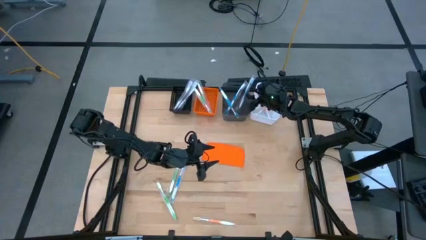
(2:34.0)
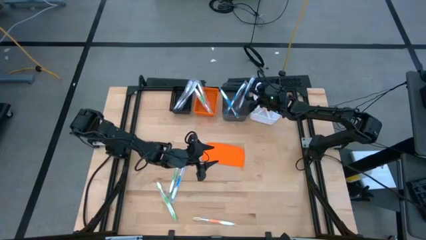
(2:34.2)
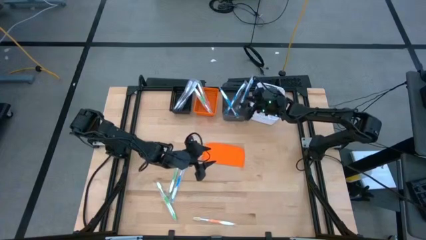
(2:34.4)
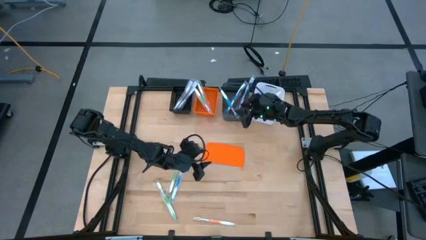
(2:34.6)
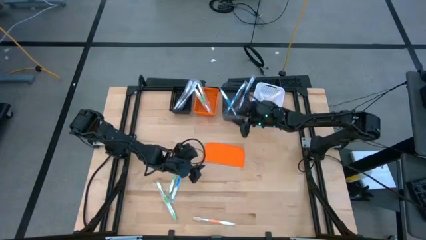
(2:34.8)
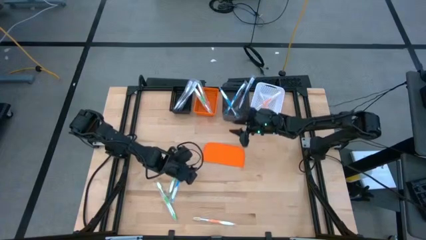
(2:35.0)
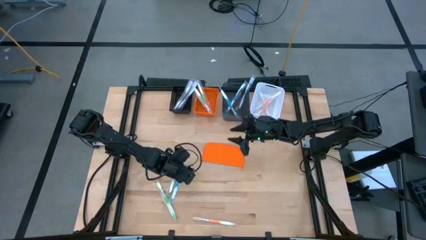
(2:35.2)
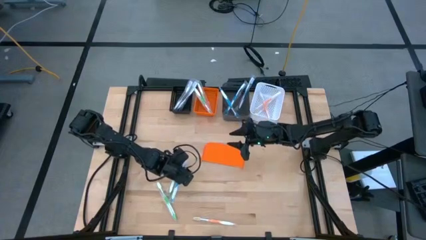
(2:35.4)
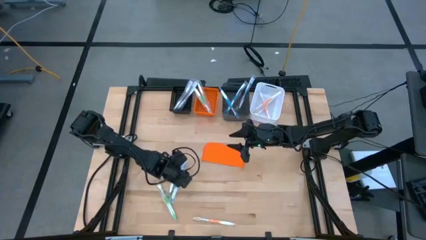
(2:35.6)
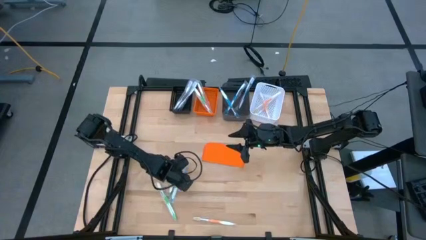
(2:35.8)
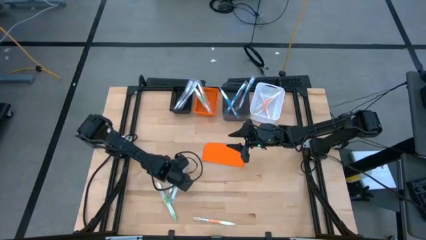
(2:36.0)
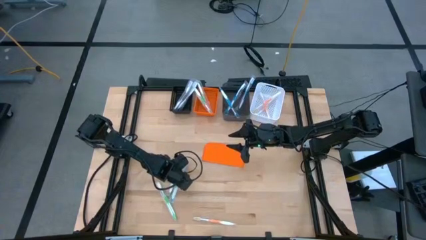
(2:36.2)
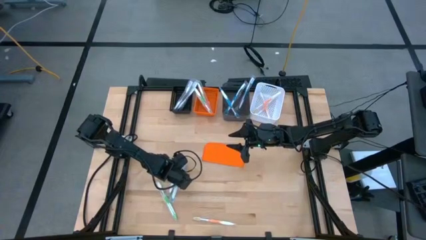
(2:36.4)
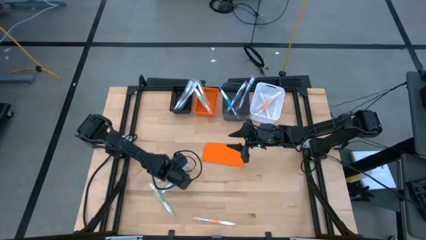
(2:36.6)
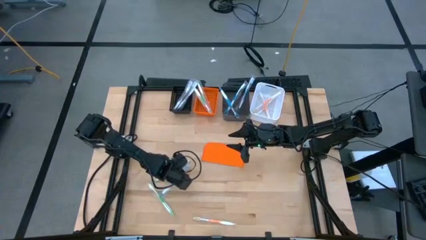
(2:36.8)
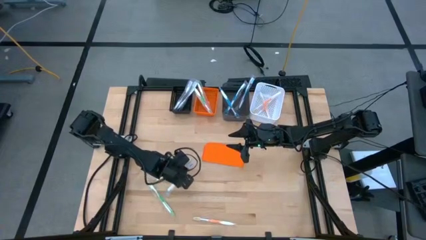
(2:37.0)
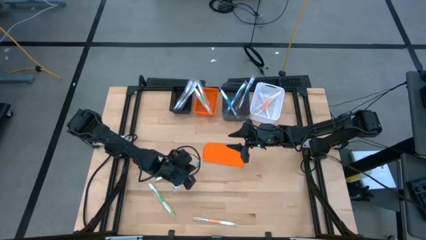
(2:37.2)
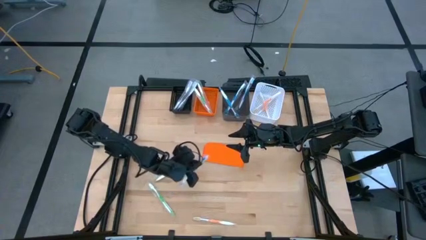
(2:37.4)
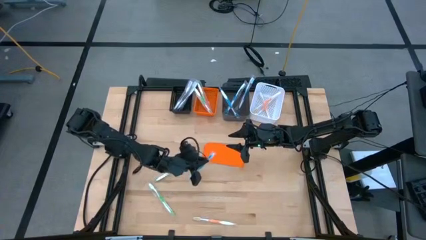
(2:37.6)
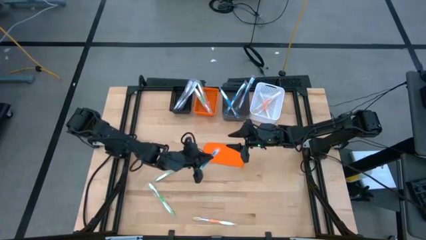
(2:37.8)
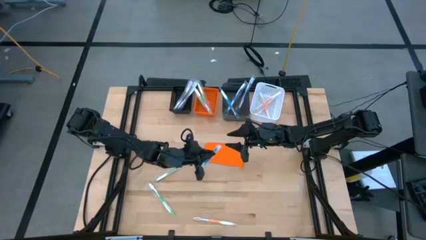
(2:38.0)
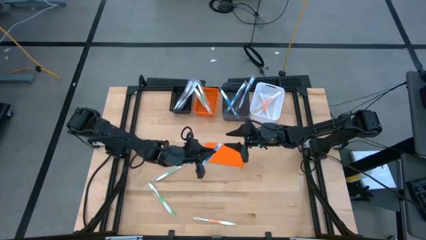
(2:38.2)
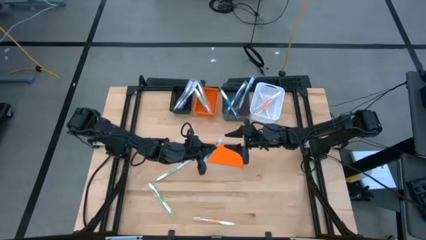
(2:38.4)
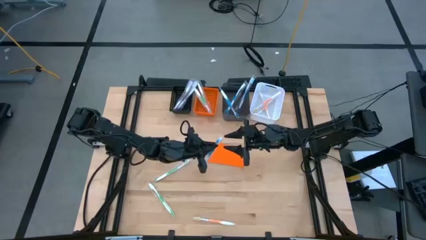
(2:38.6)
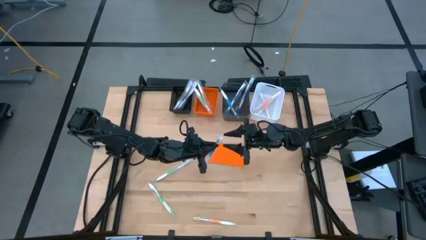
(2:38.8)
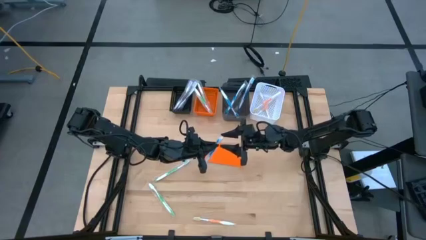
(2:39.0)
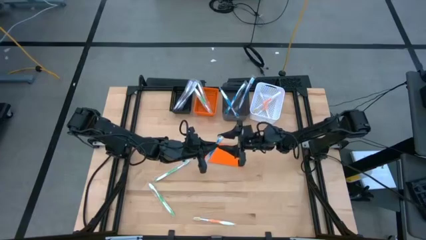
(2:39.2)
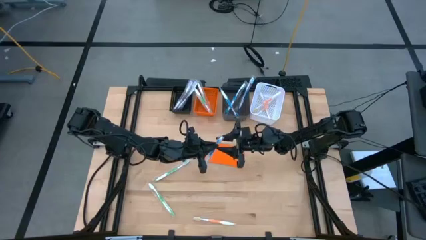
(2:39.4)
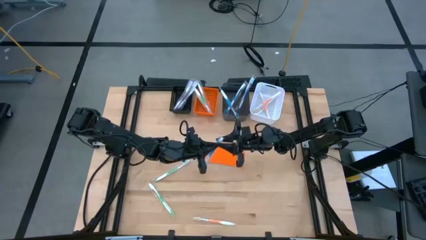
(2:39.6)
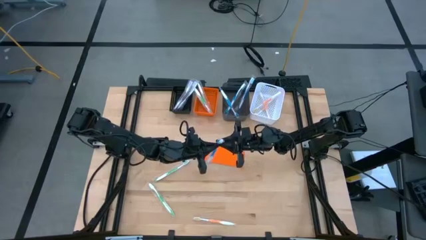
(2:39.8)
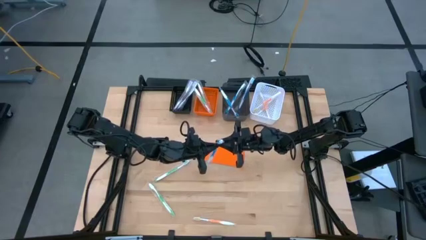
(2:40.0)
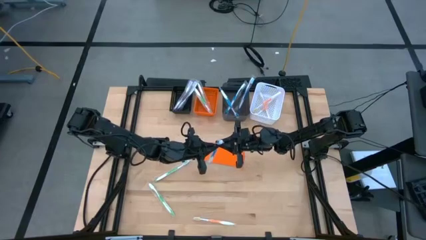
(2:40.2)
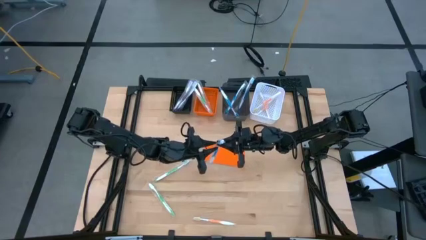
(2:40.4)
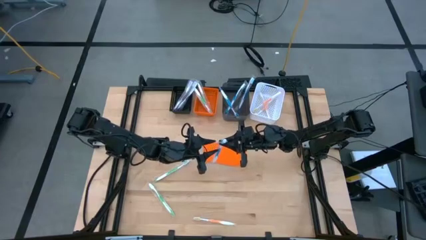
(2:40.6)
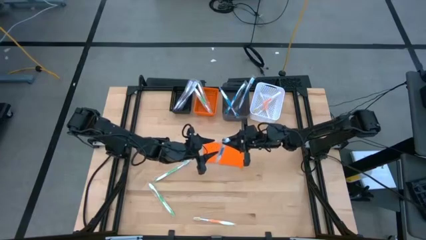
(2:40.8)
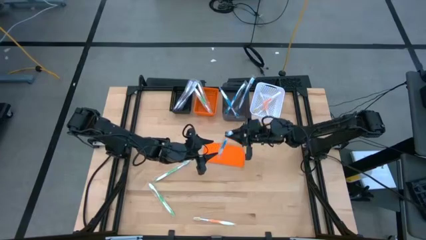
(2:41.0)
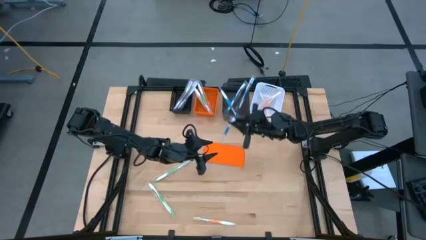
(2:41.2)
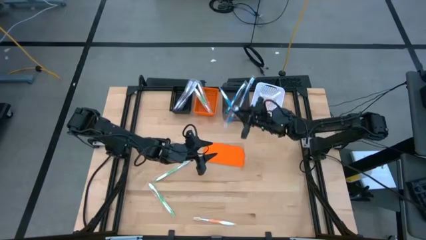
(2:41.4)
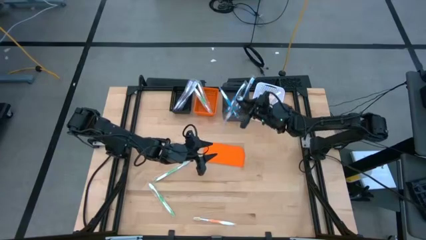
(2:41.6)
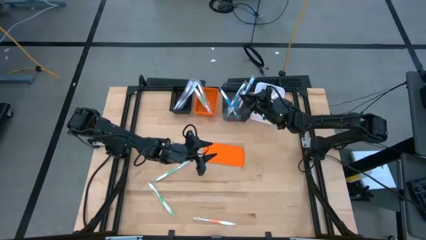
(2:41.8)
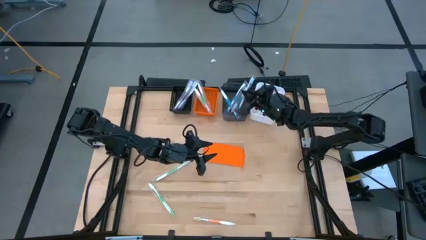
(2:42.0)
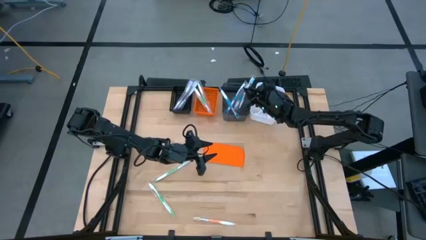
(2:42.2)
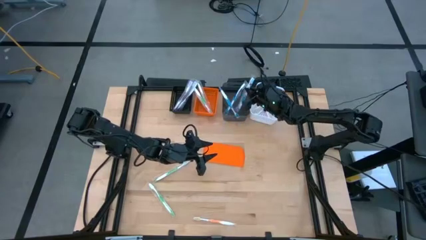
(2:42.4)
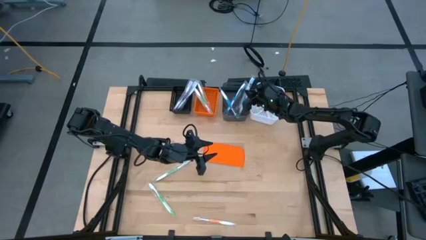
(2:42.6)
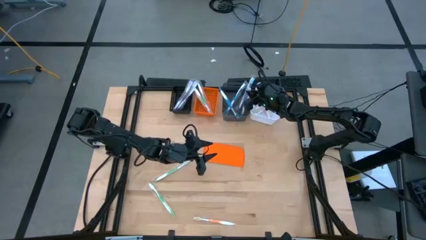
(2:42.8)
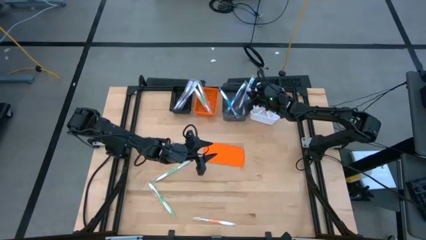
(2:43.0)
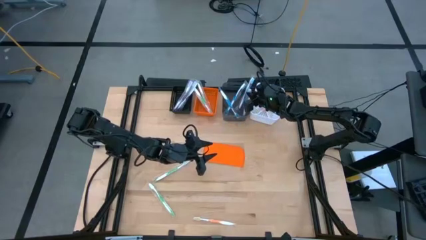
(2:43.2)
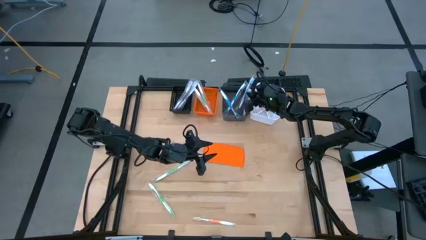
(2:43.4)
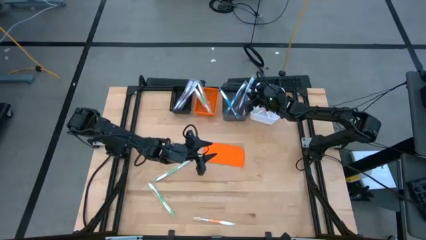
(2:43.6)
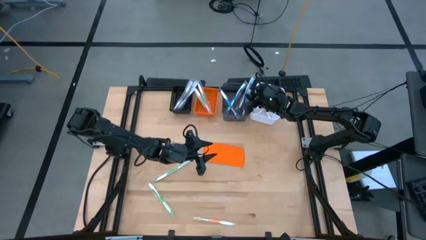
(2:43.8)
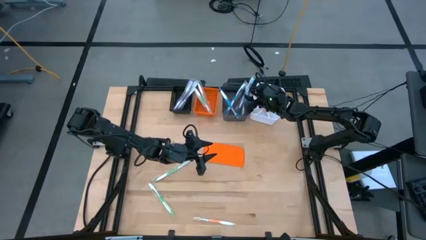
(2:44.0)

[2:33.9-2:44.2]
Task: Pick & Place Toothbrushes
Put the blue toothbrush into the black transparent bin
